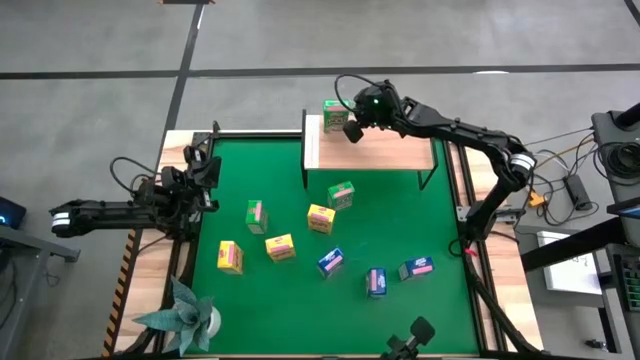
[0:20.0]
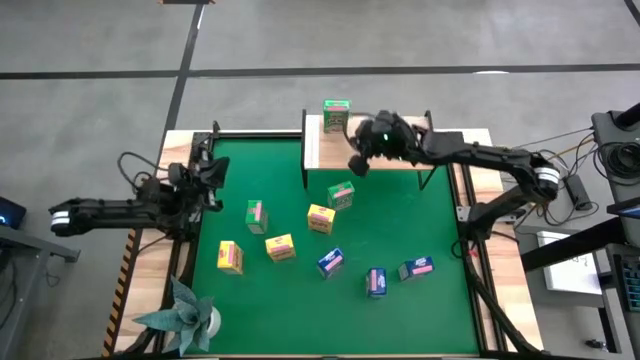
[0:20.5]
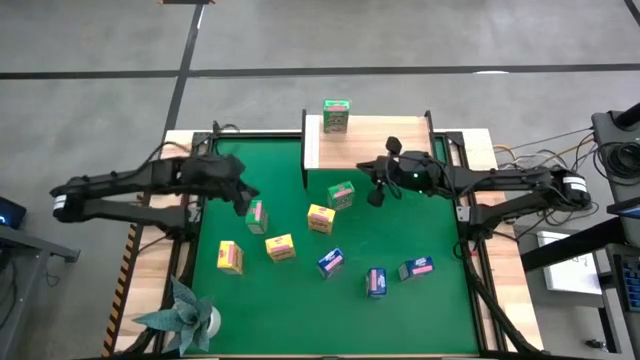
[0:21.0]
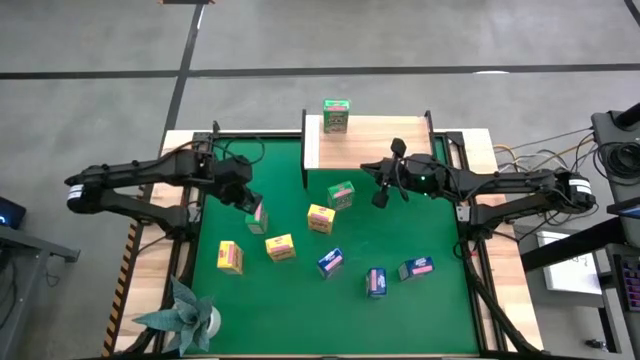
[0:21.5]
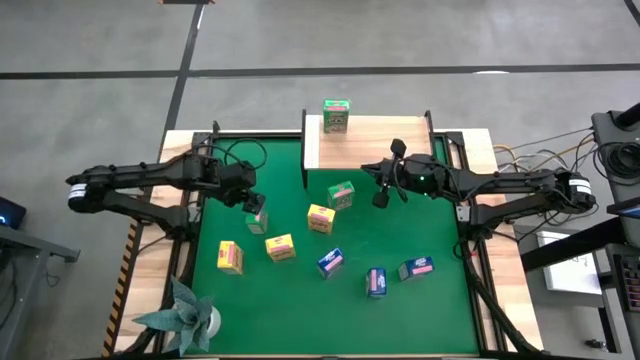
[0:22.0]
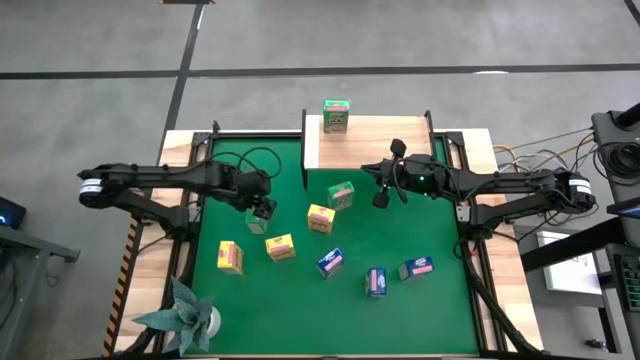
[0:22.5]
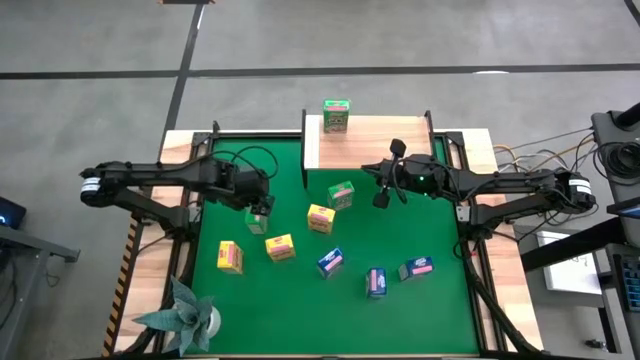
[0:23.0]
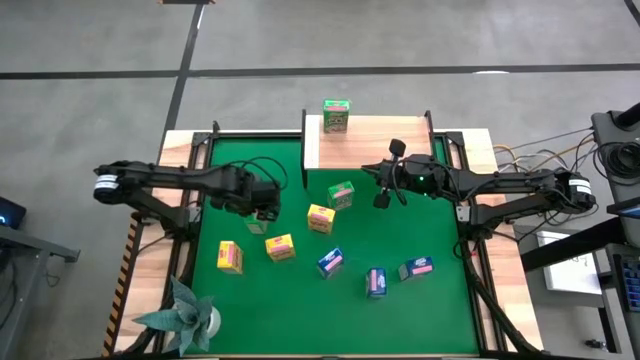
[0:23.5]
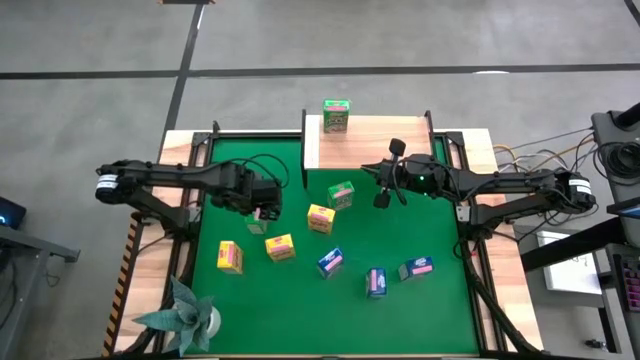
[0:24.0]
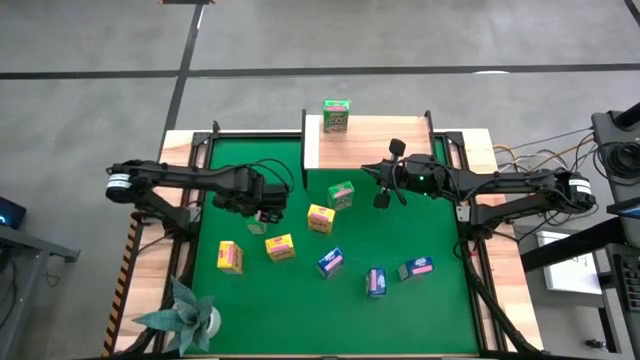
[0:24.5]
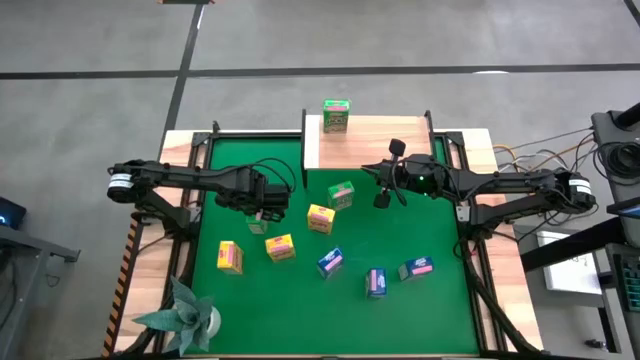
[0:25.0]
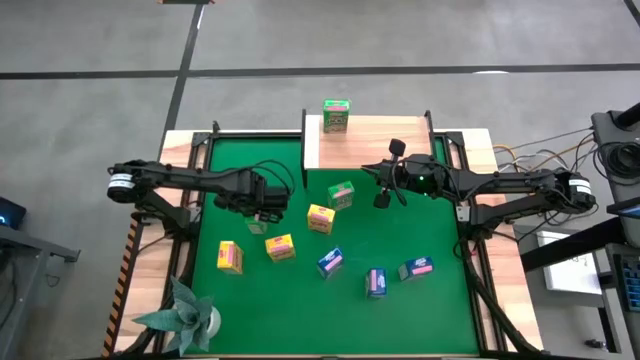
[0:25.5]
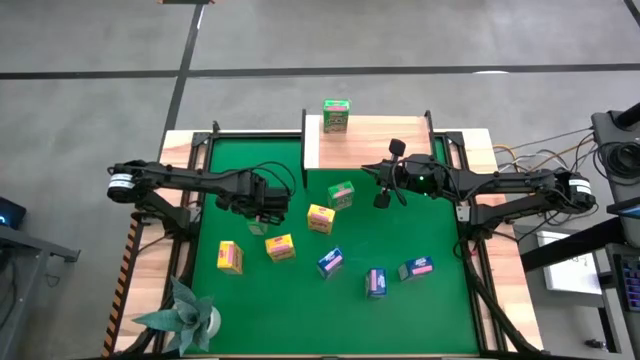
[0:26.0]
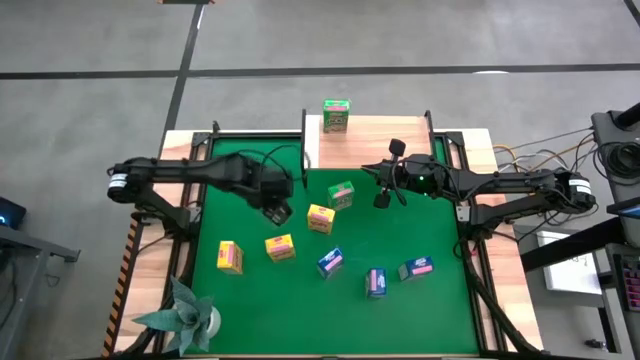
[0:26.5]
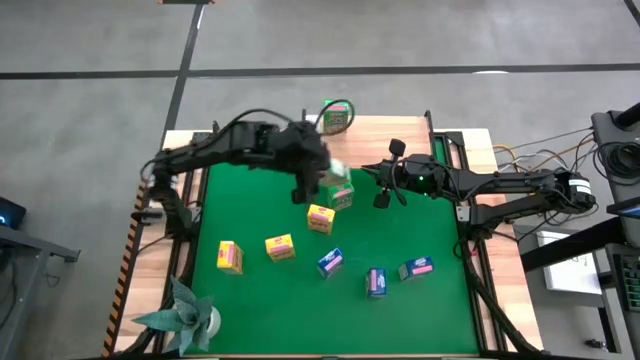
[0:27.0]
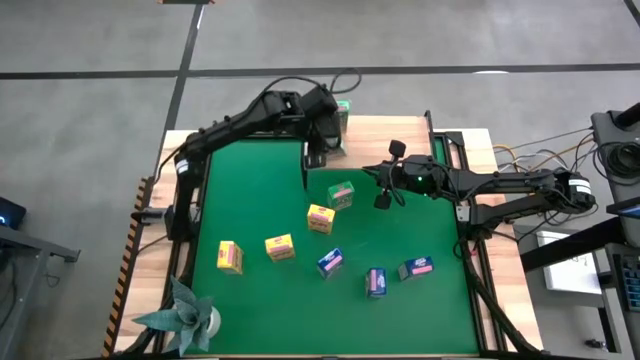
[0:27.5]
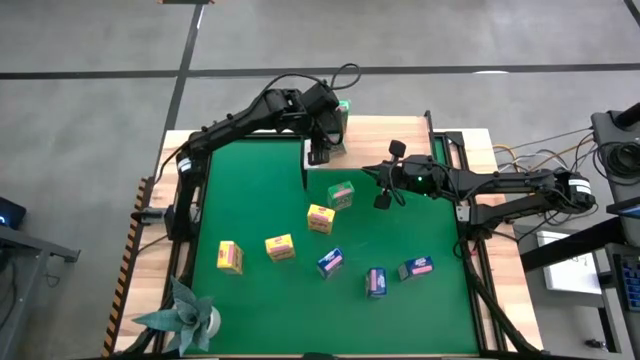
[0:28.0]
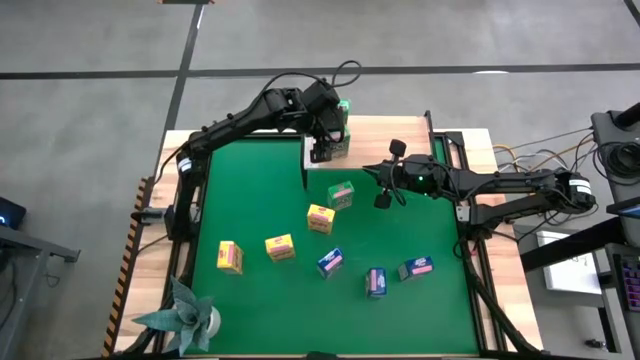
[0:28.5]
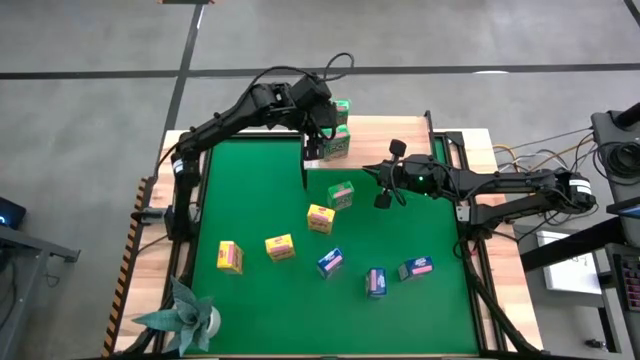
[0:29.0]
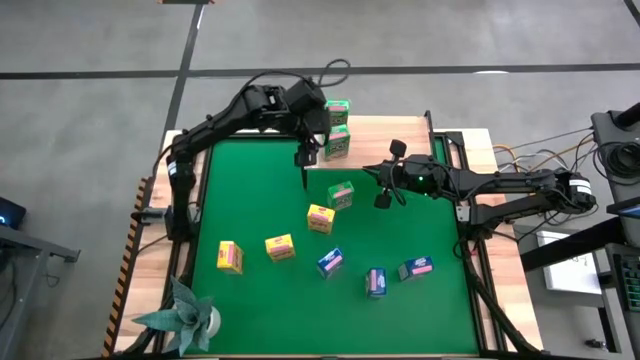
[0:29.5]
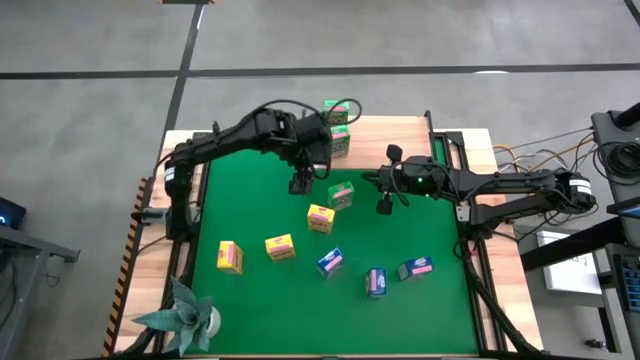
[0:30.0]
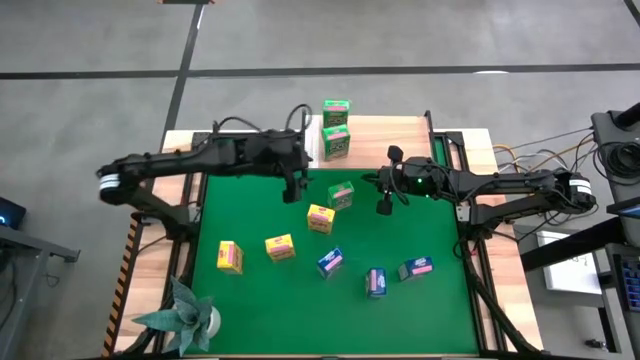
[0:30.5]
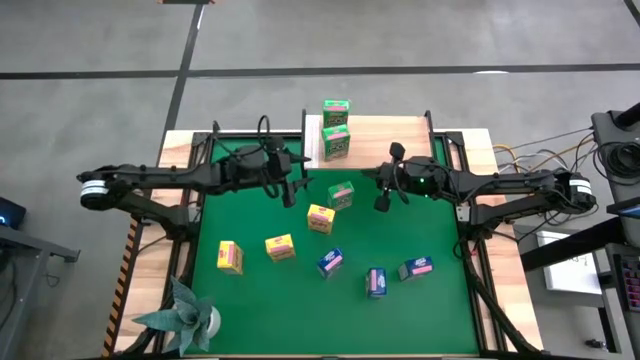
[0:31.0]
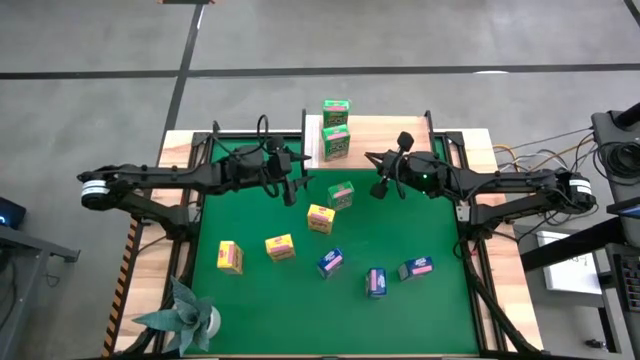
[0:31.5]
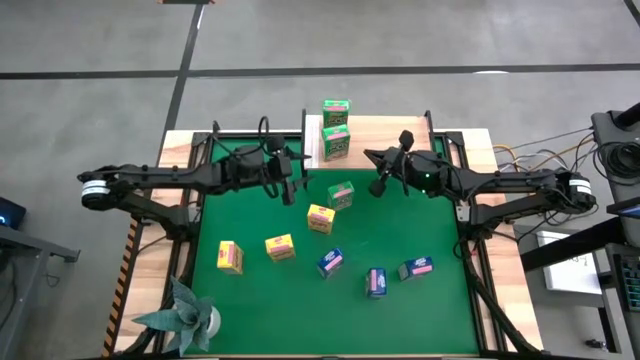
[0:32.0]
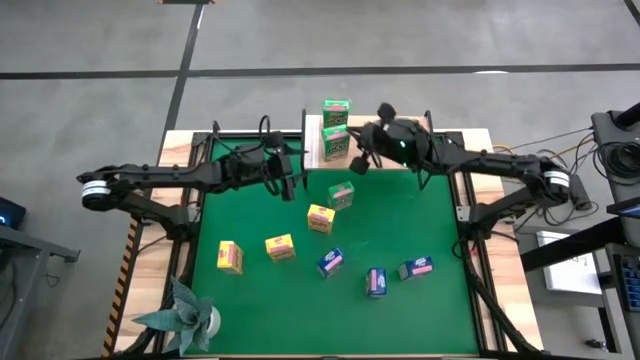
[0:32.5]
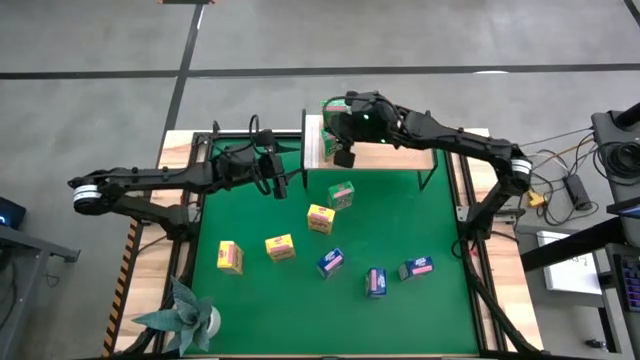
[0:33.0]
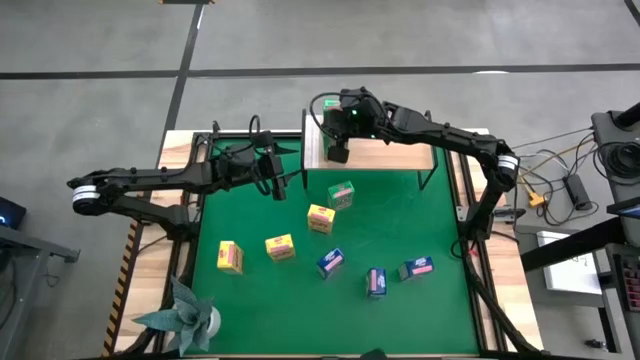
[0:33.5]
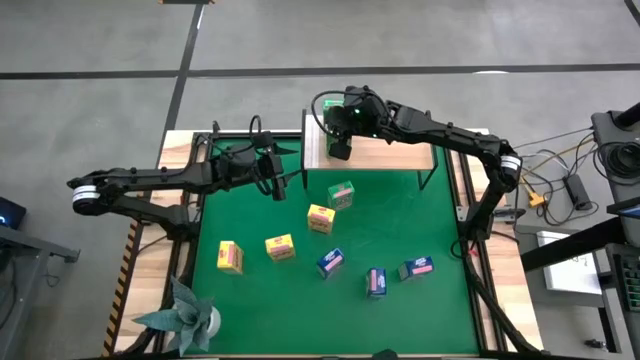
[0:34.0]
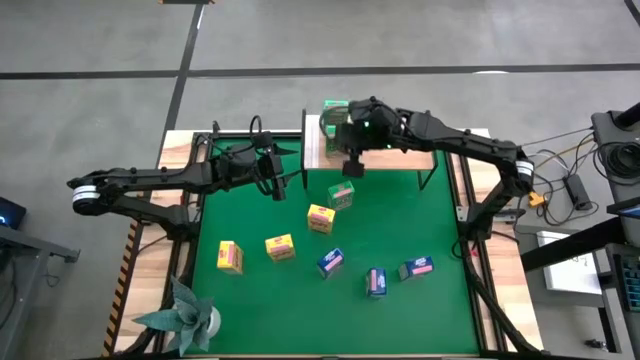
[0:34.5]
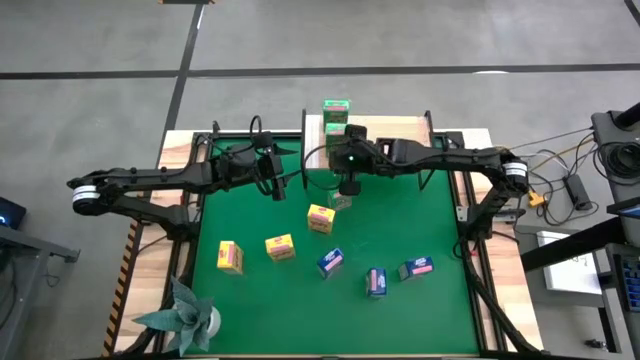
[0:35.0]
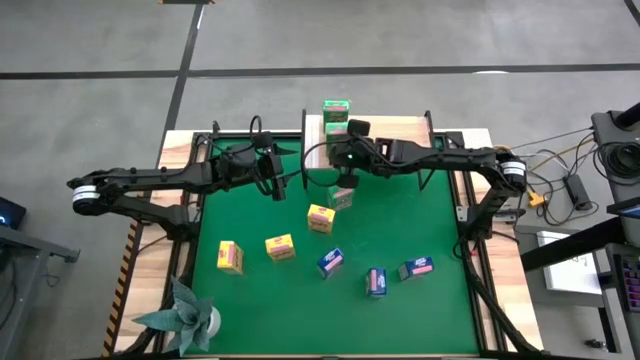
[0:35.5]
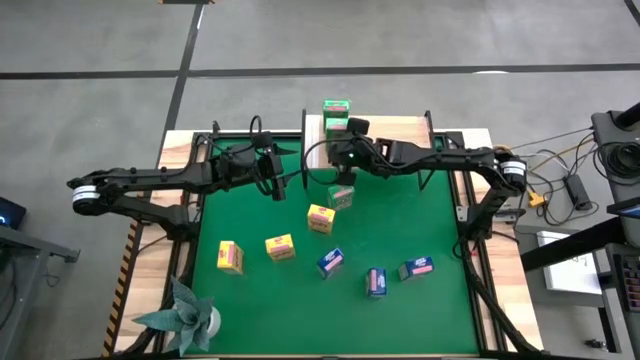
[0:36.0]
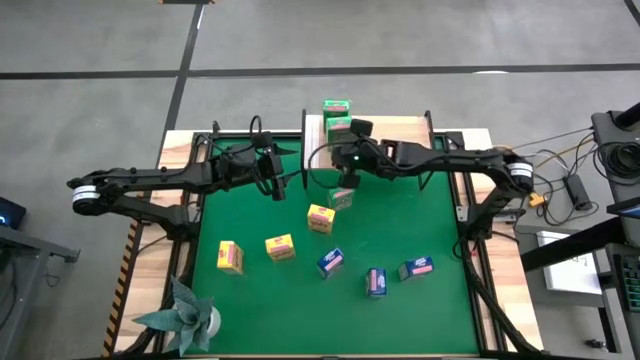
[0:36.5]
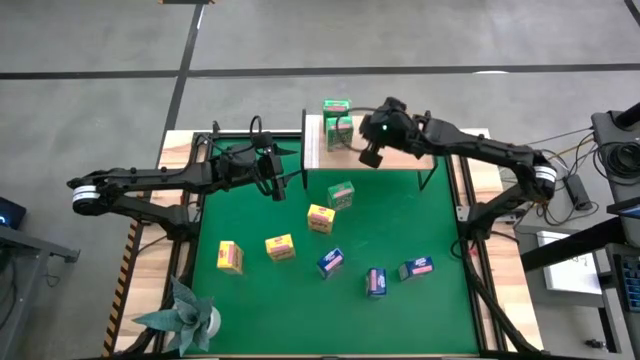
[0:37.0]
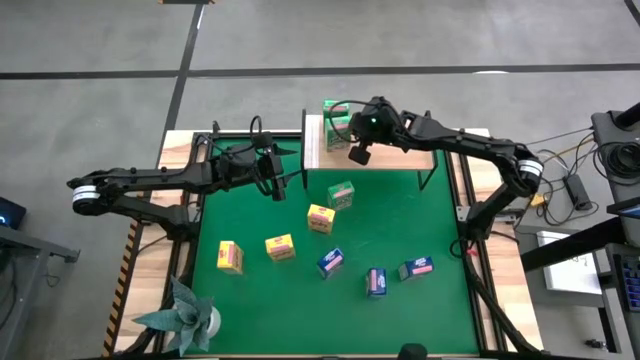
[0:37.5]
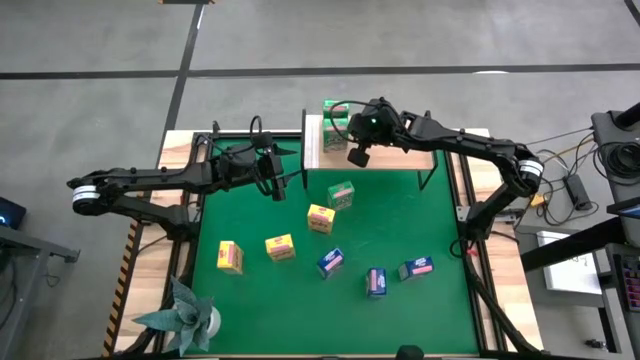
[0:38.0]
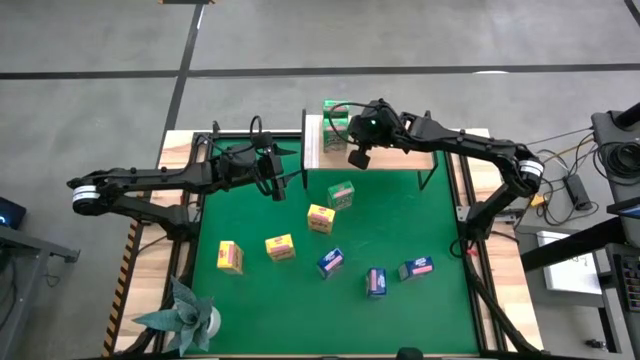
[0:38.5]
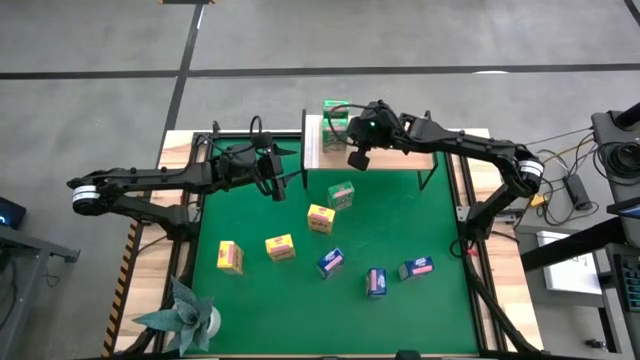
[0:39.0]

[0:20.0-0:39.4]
Task: Stack cereal on shelf
Put the left green cereal box on the shelf aligned with the other green cereal box

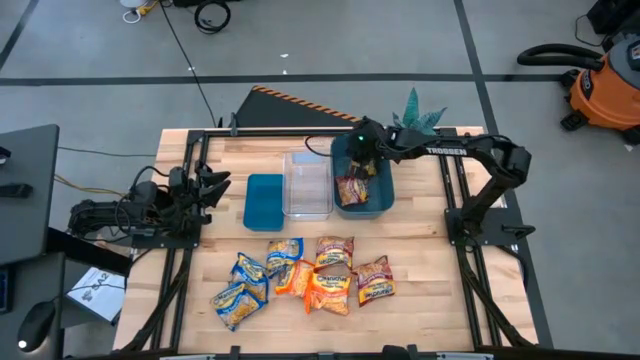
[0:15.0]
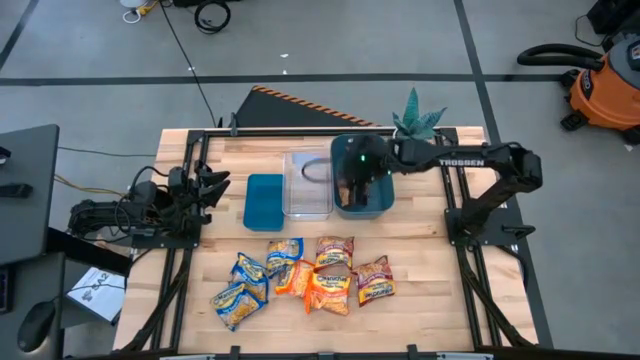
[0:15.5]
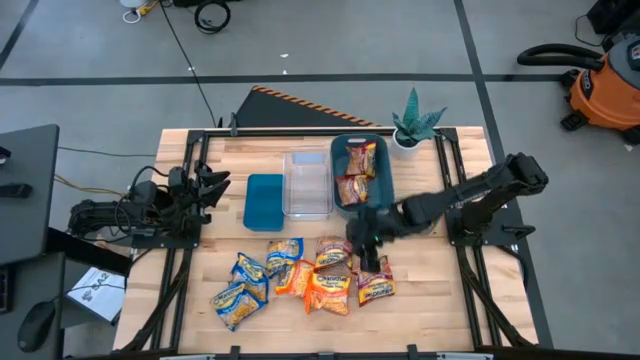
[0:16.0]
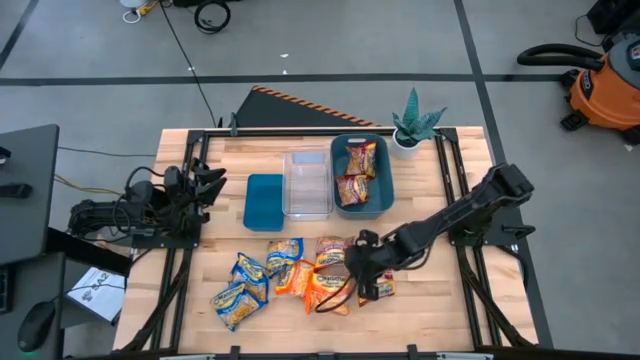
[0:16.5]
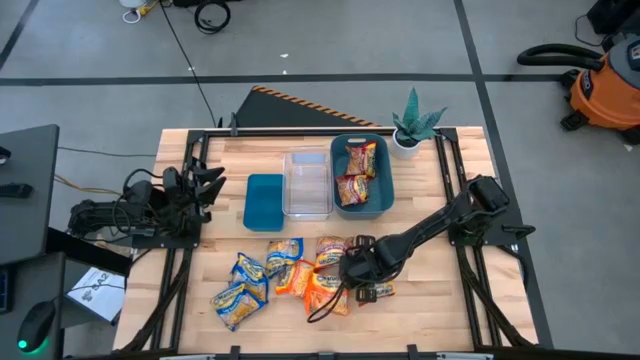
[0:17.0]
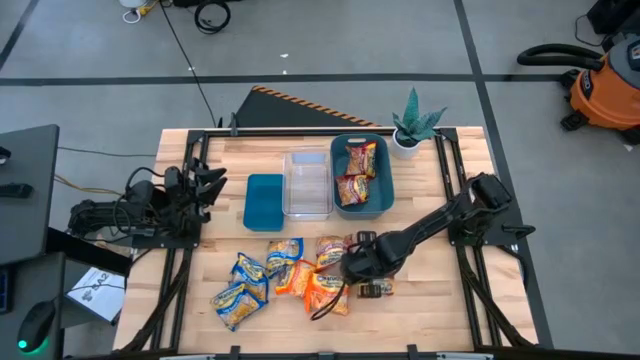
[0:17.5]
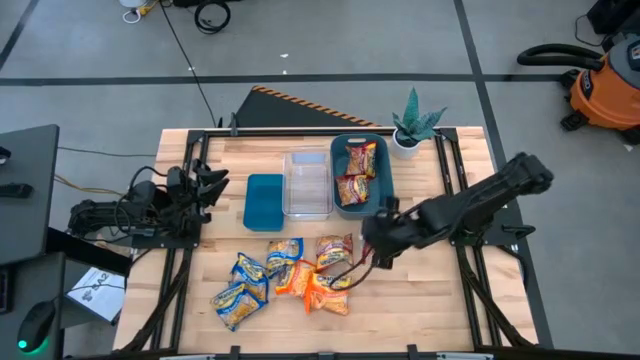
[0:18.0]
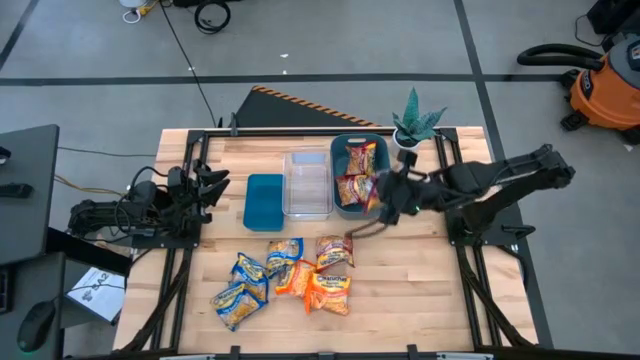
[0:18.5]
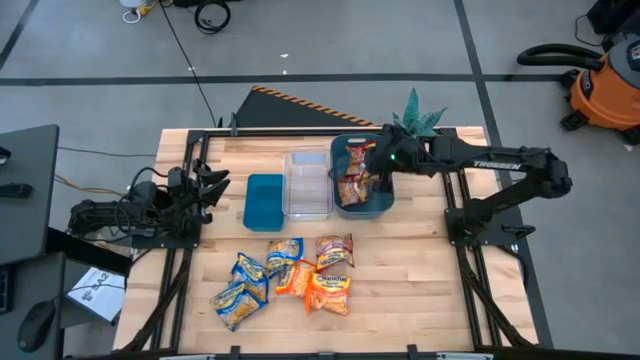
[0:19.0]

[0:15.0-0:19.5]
Task: Sort Maruchan noodles
Put the red noodle pack into the green bin
